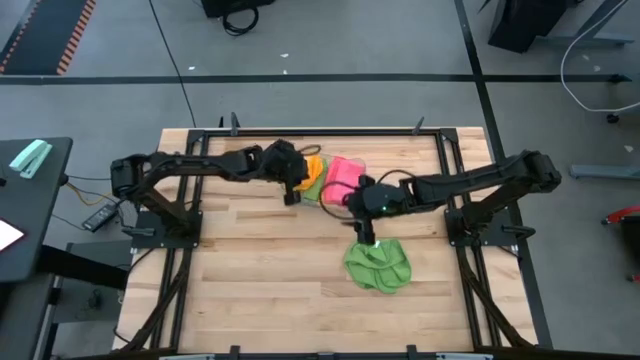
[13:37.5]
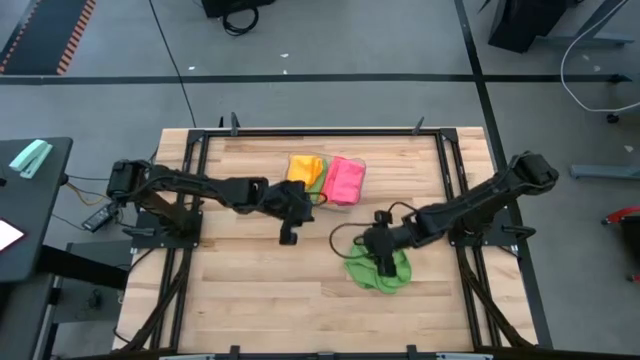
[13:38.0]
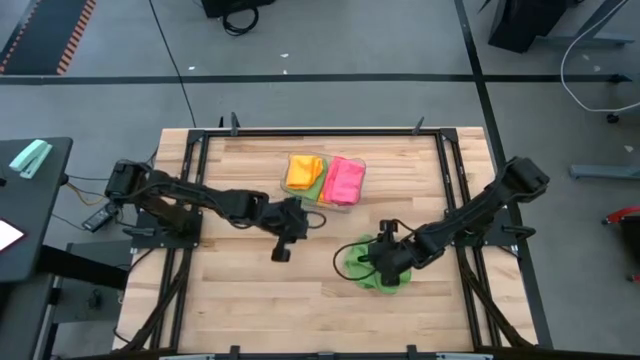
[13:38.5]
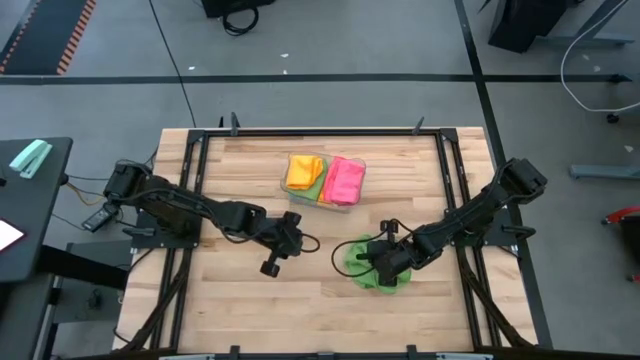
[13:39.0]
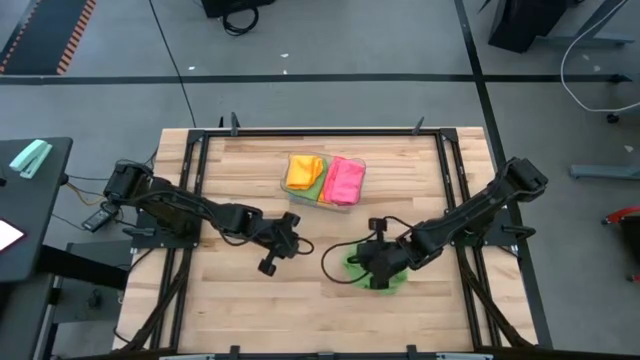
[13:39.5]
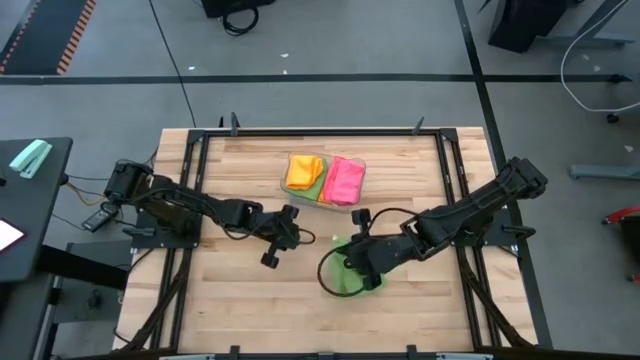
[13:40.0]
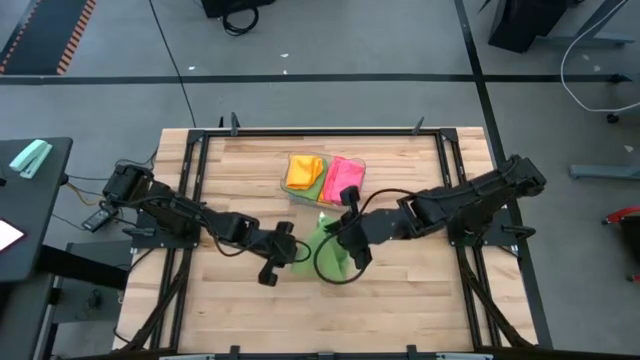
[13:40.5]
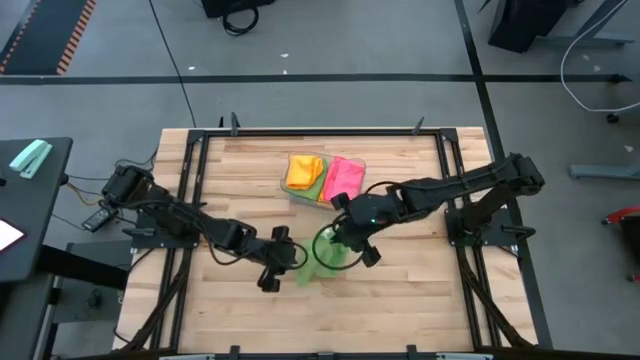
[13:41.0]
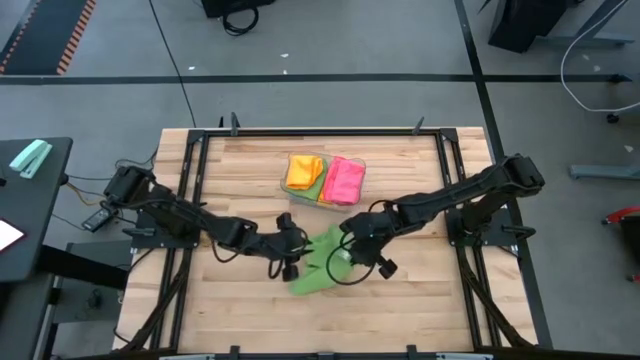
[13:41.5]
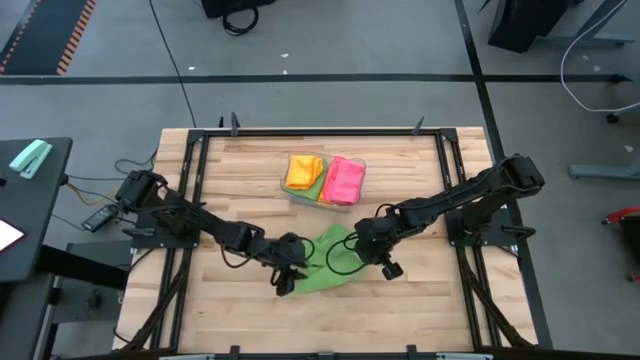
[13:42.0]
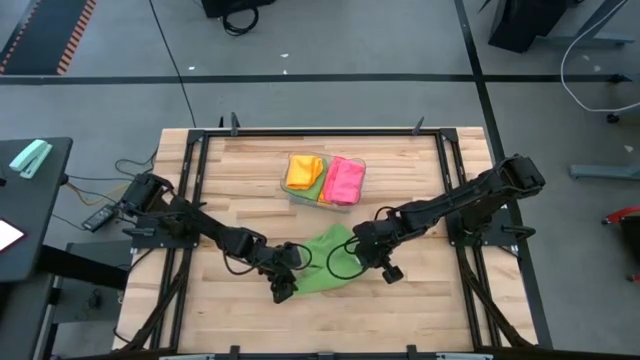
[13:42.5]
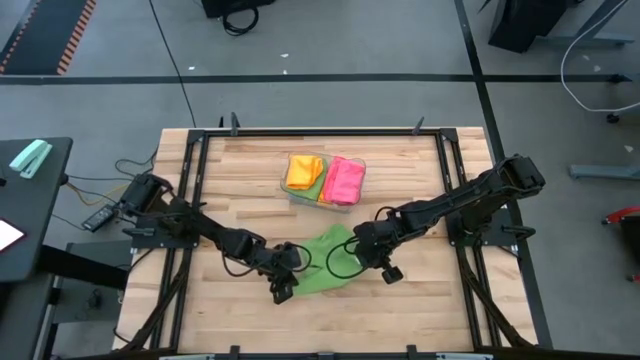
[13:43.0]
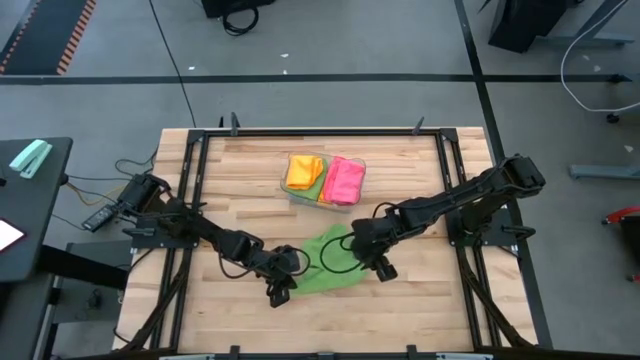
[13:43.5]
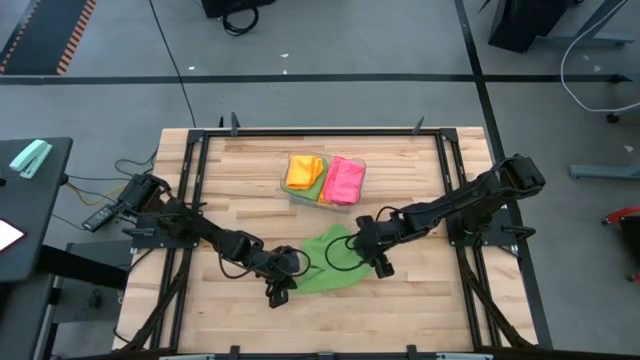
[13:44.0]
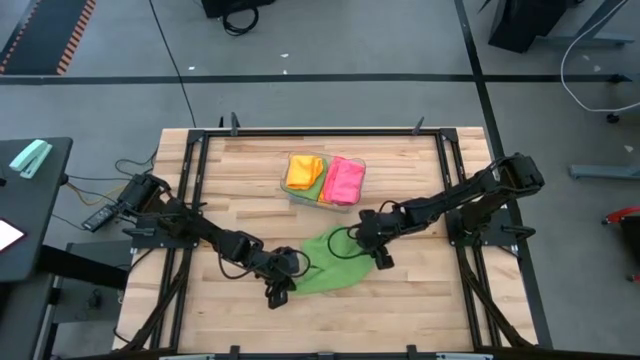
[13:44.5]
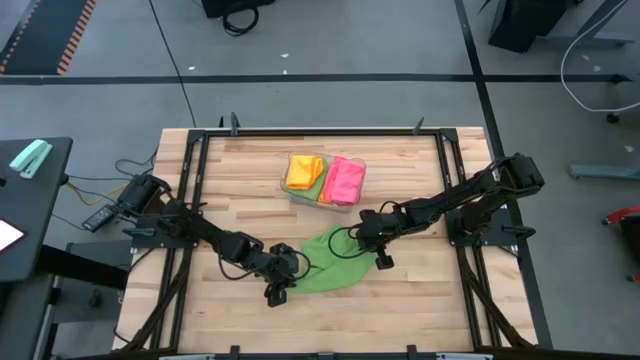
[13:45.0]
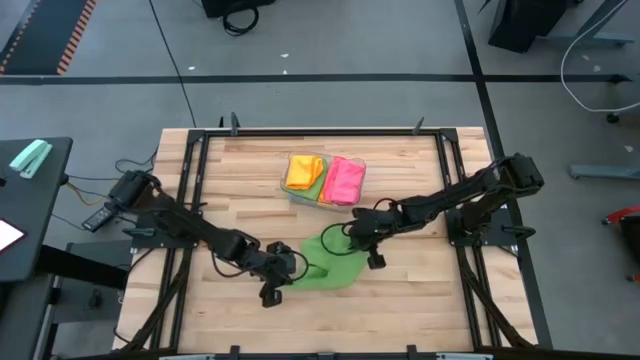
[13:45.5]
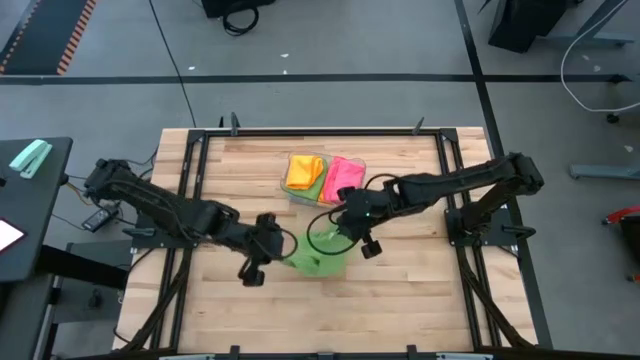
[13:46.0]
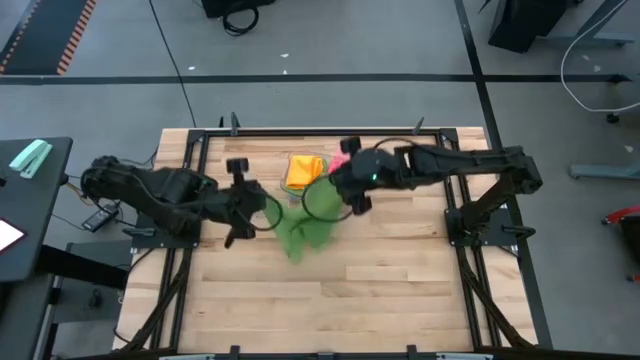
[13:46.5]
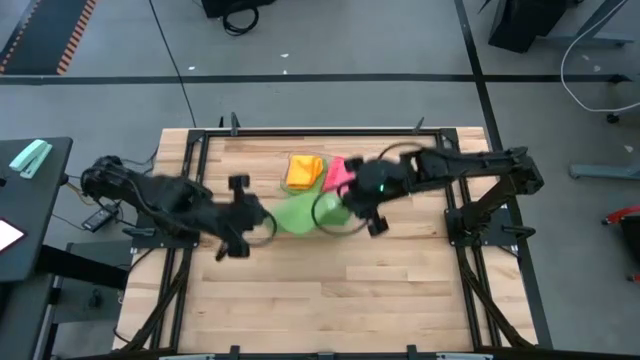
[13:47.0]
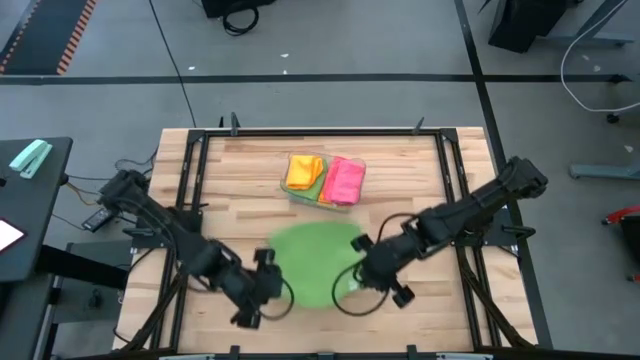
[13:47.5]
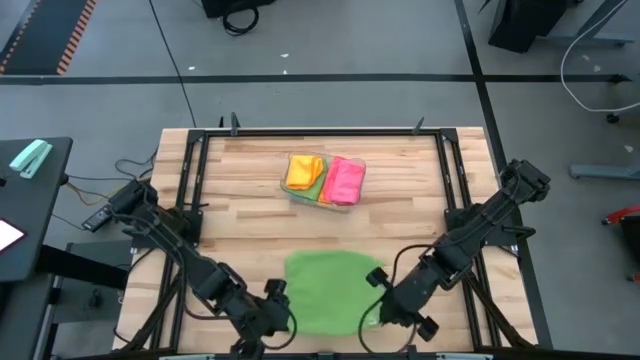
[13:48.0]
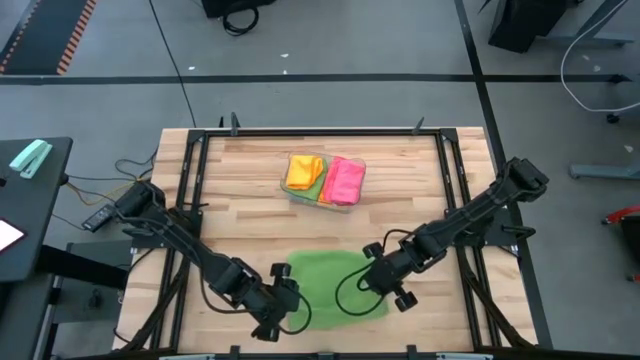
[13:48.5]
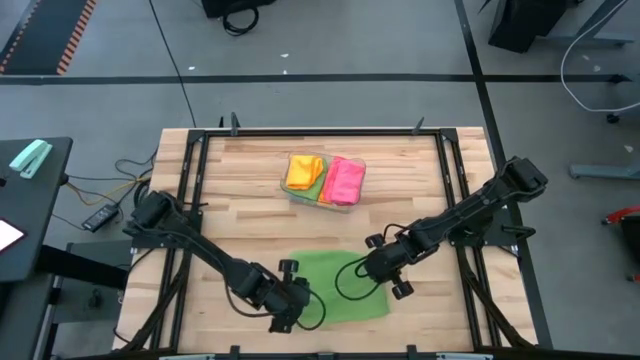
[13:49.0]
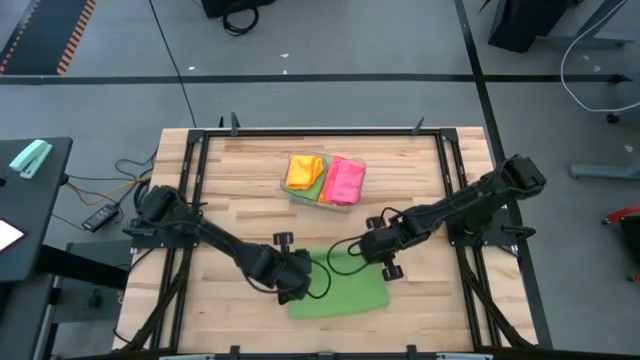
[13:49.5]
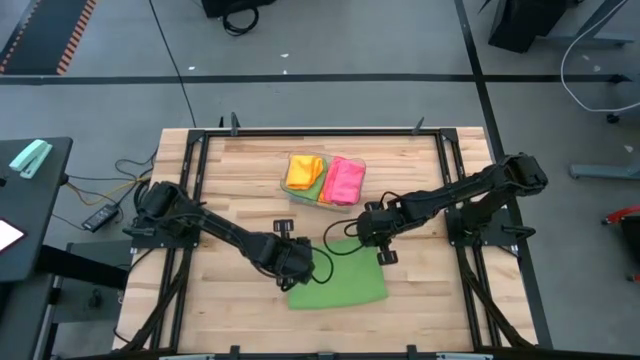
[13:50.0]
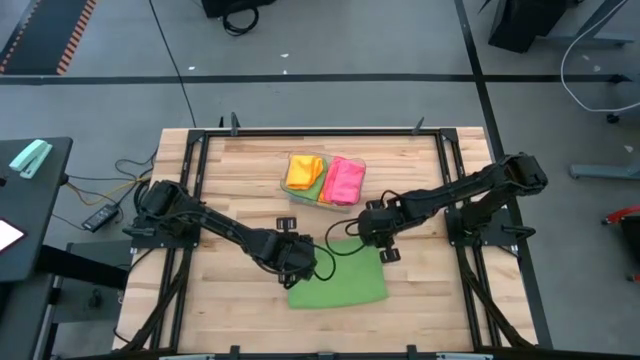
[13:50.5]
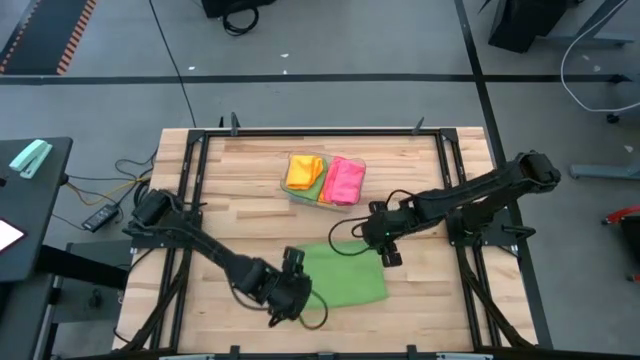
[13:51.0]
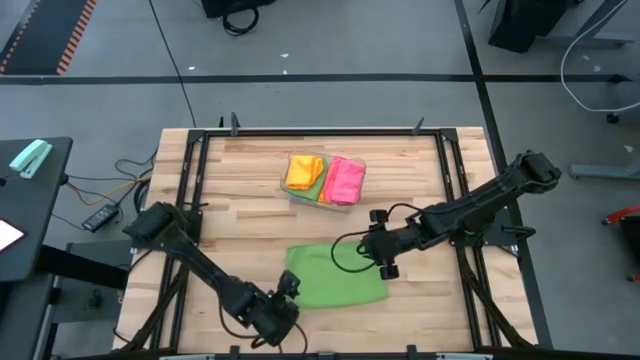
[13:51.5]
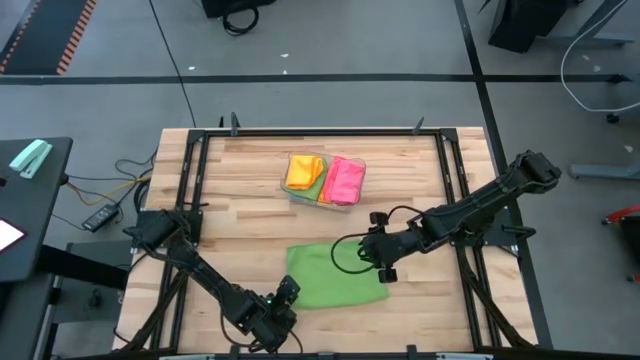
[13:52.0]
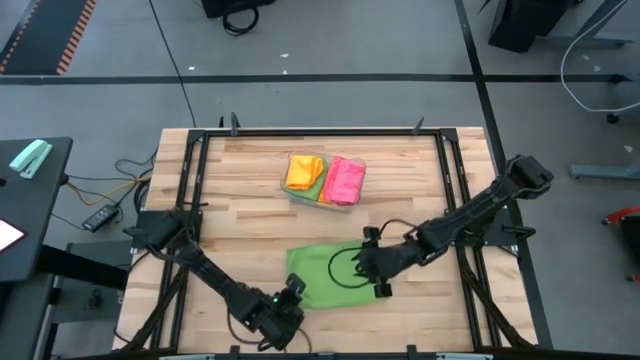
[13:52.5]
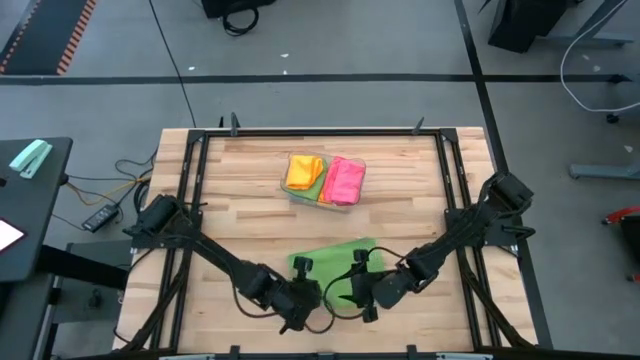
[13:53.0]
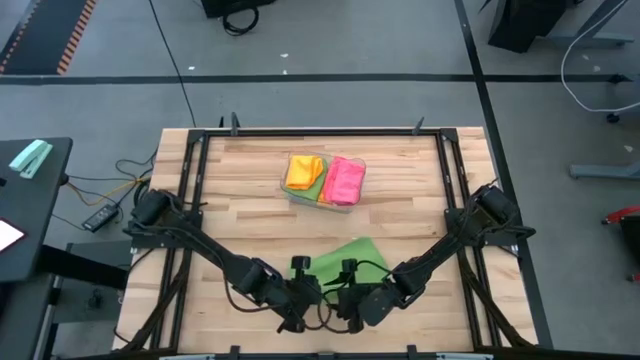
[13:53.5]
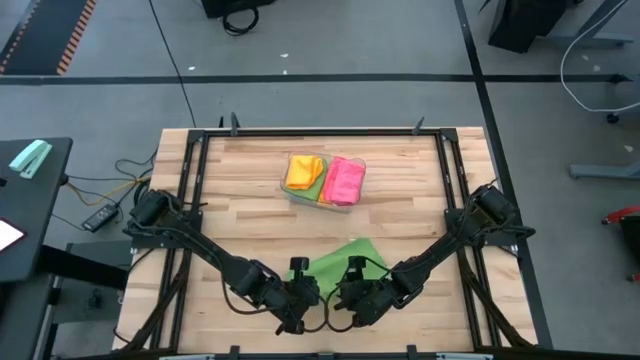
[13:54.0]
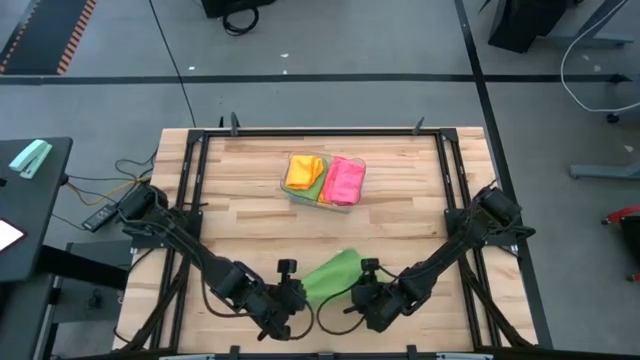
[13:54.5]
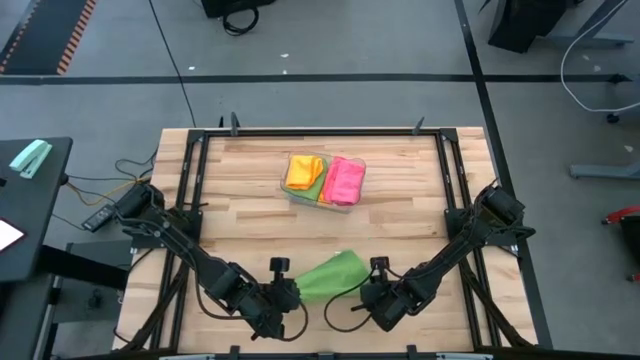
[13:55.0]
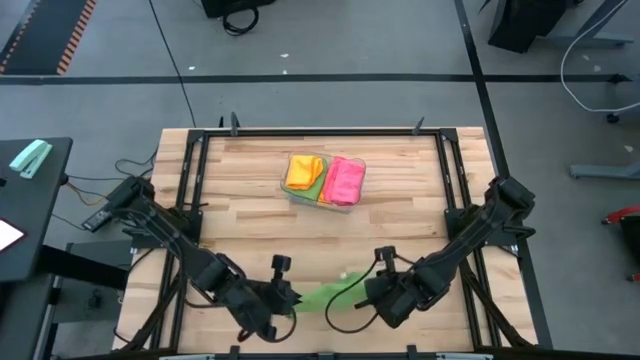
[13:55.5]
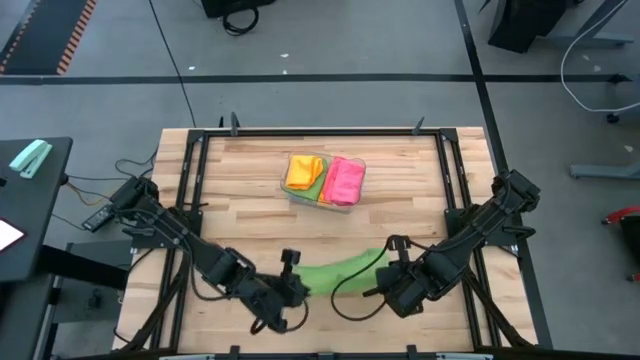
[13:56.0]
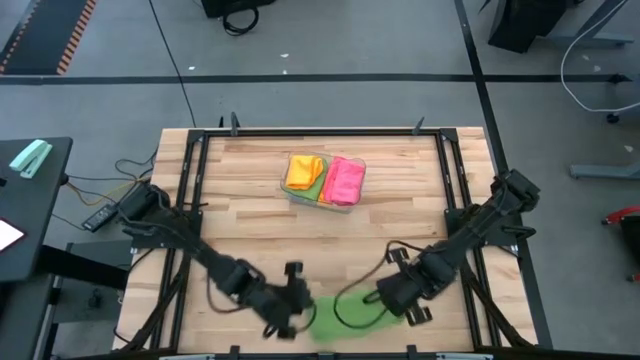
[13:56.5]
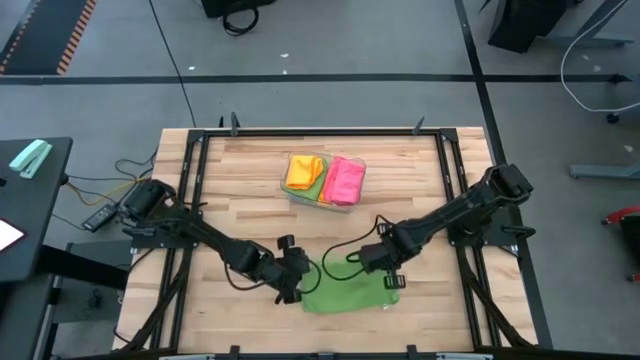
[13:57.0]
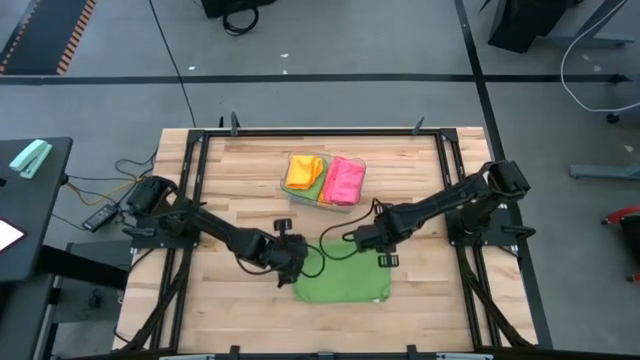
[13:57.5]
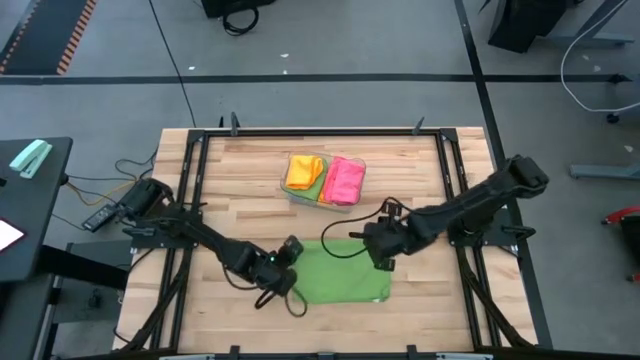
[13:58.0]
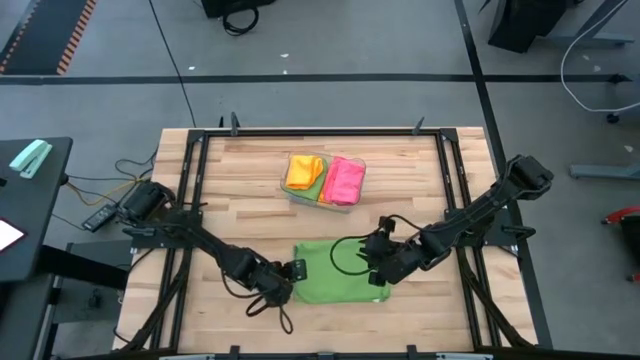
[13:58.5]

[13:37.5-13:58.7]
Task: Fold microfiber towels
Fold the green microfiber cloth
